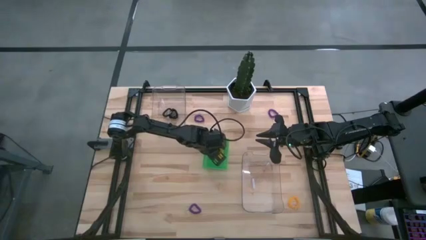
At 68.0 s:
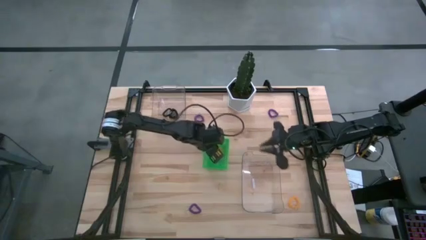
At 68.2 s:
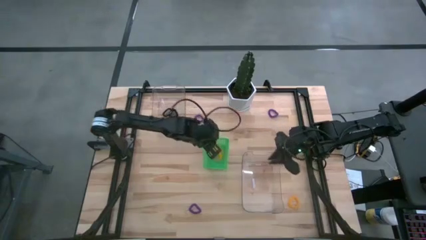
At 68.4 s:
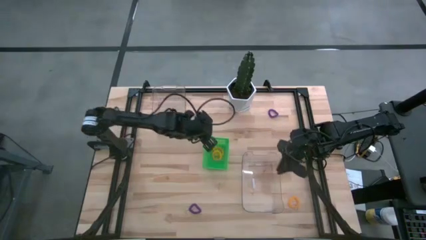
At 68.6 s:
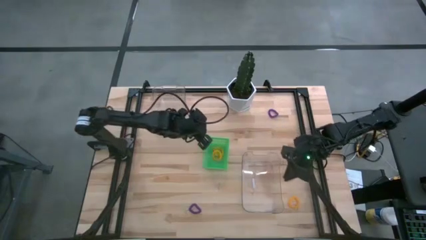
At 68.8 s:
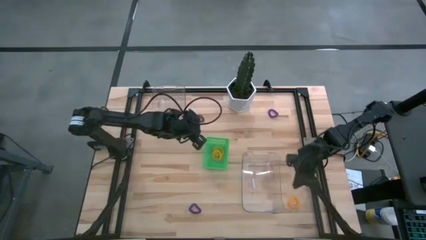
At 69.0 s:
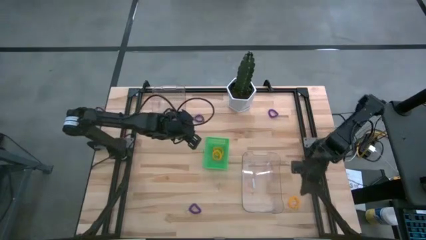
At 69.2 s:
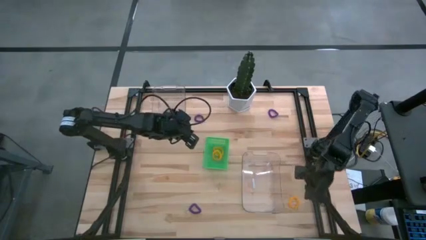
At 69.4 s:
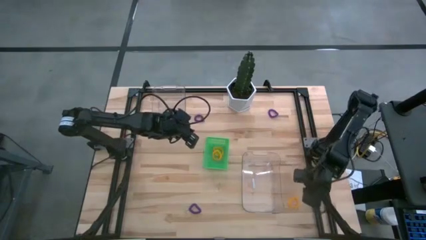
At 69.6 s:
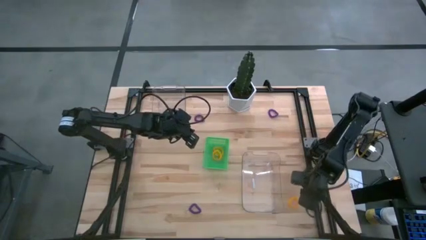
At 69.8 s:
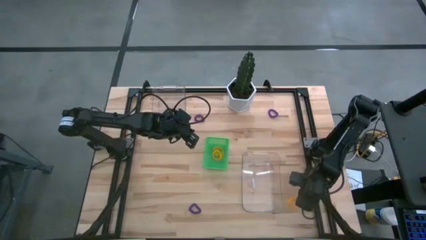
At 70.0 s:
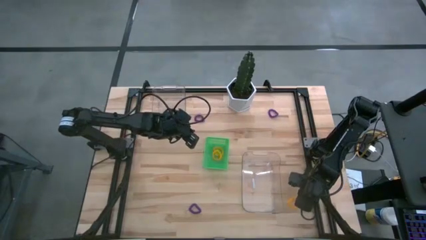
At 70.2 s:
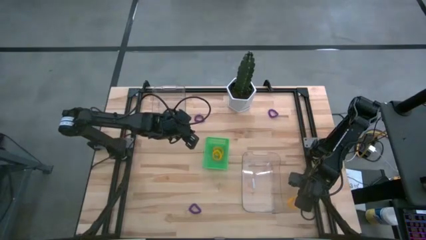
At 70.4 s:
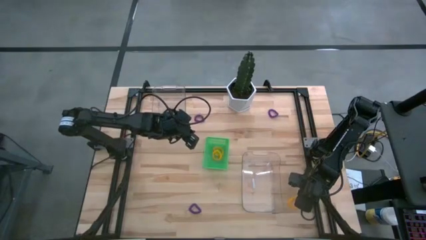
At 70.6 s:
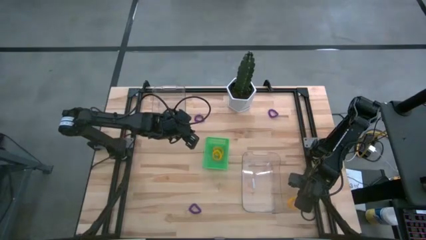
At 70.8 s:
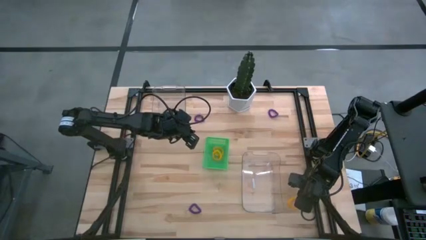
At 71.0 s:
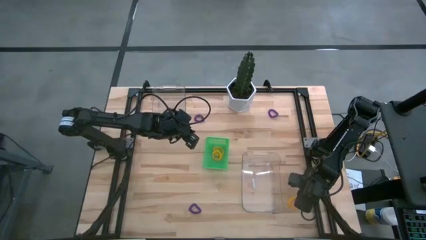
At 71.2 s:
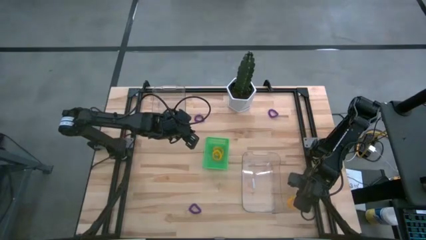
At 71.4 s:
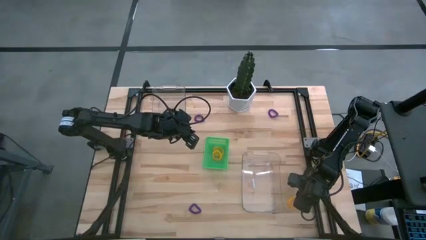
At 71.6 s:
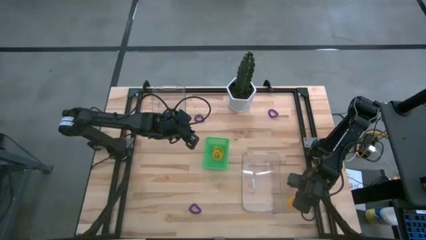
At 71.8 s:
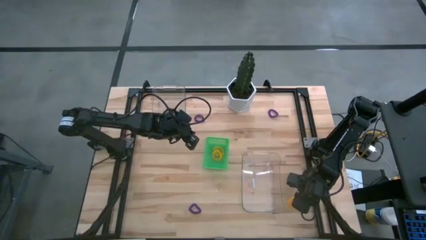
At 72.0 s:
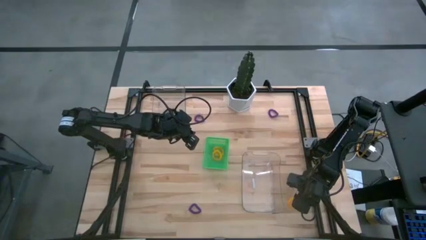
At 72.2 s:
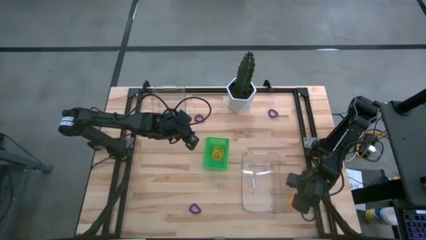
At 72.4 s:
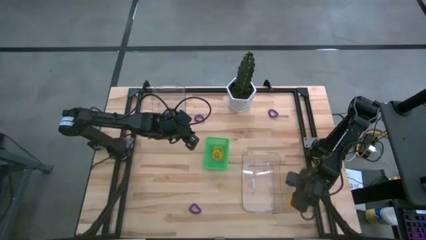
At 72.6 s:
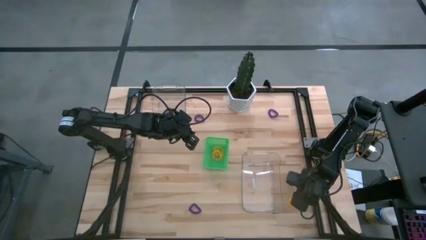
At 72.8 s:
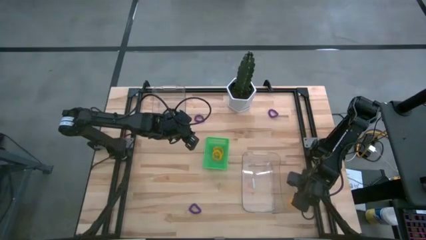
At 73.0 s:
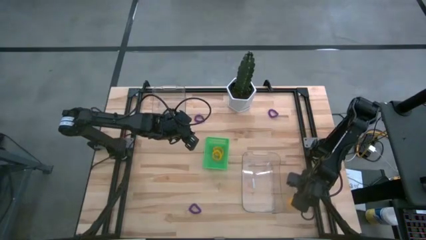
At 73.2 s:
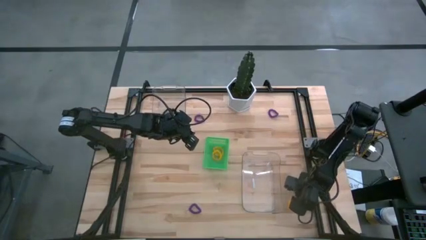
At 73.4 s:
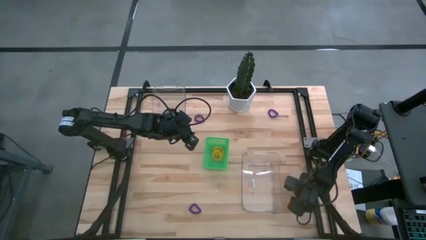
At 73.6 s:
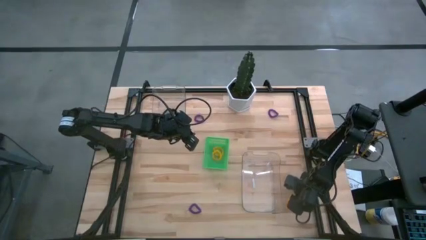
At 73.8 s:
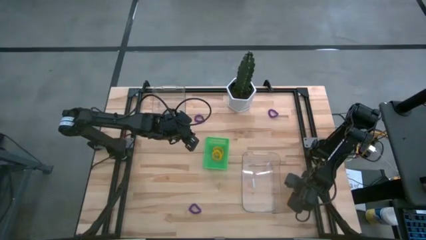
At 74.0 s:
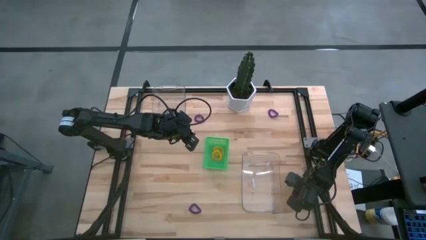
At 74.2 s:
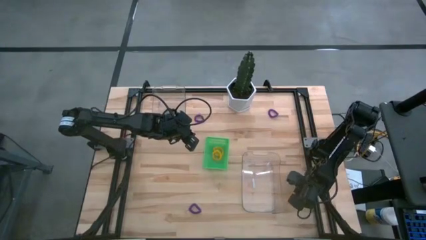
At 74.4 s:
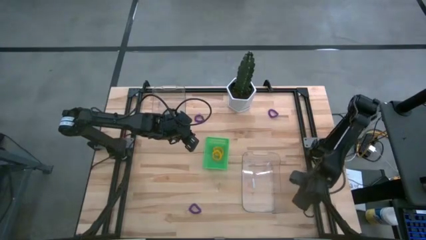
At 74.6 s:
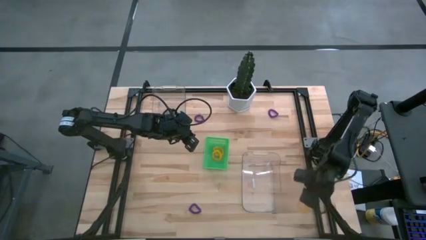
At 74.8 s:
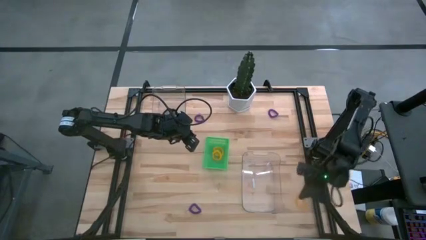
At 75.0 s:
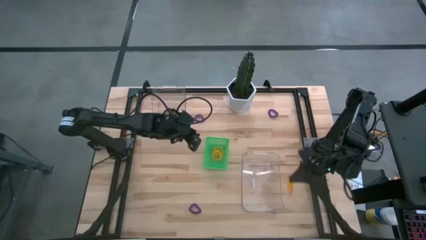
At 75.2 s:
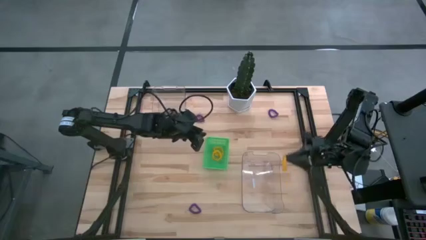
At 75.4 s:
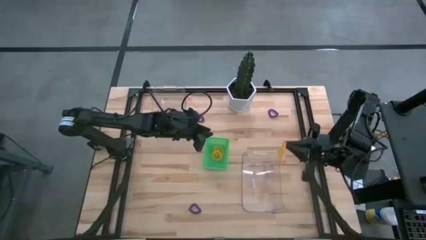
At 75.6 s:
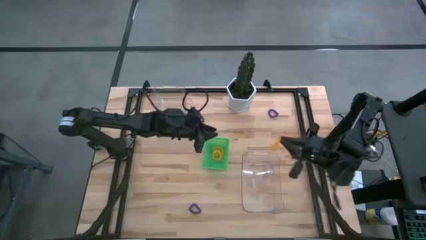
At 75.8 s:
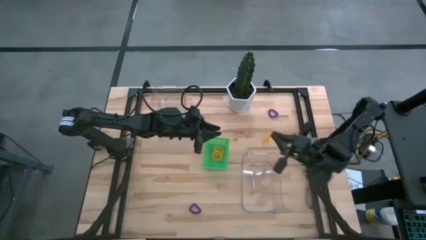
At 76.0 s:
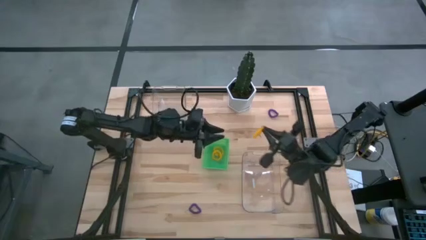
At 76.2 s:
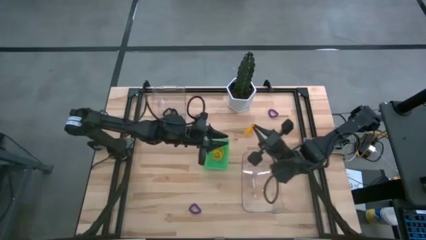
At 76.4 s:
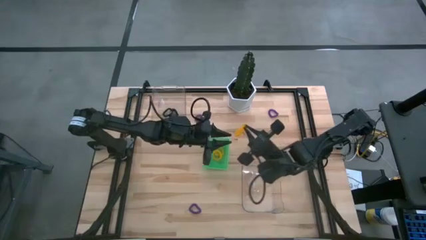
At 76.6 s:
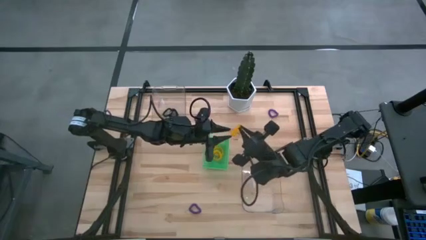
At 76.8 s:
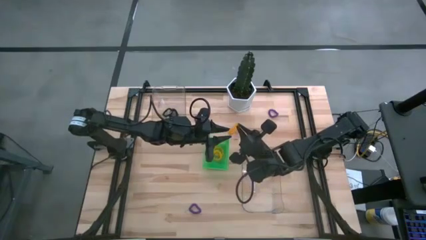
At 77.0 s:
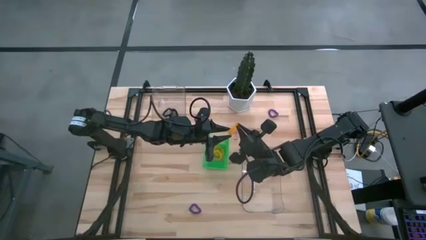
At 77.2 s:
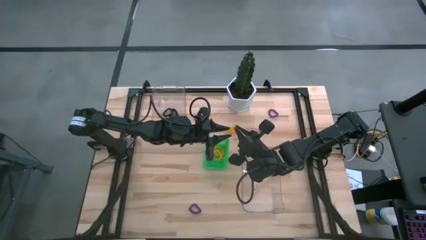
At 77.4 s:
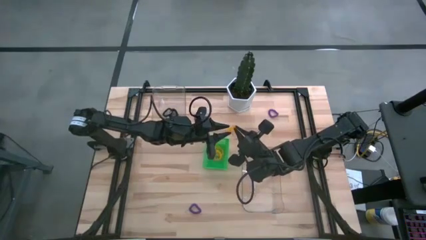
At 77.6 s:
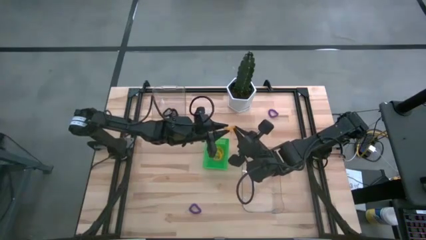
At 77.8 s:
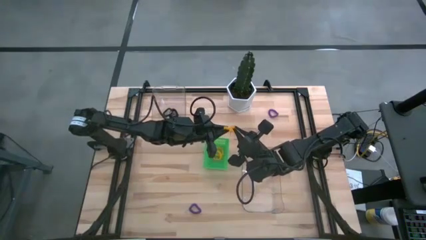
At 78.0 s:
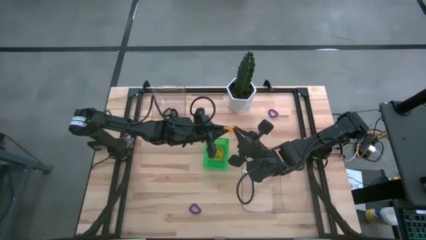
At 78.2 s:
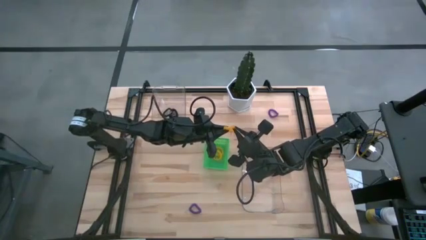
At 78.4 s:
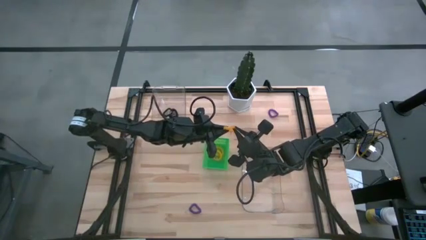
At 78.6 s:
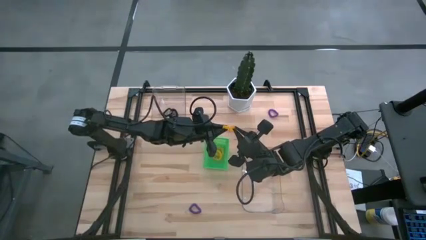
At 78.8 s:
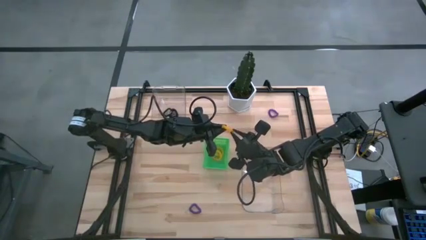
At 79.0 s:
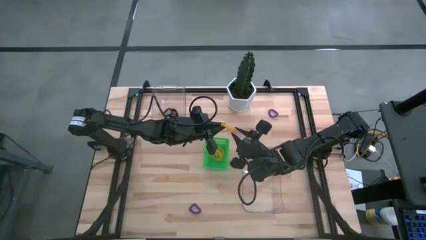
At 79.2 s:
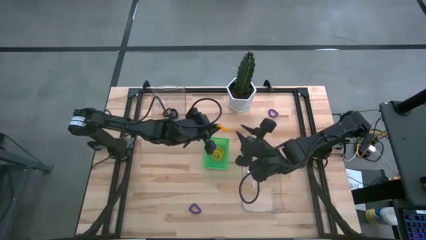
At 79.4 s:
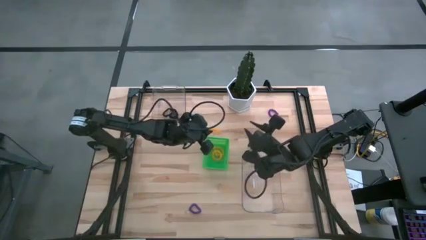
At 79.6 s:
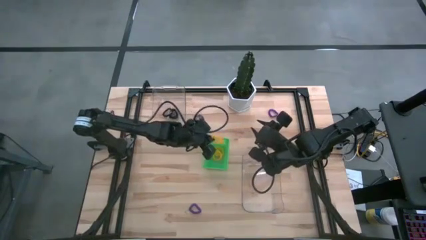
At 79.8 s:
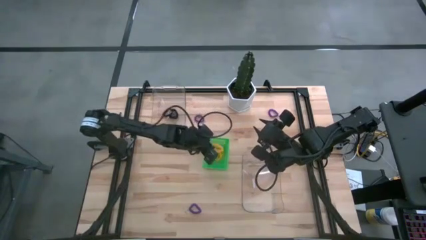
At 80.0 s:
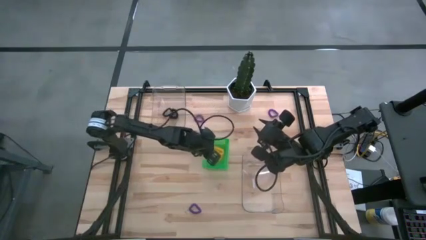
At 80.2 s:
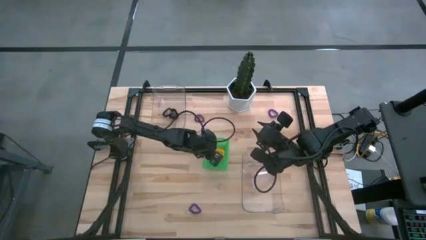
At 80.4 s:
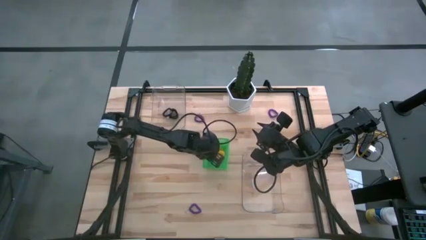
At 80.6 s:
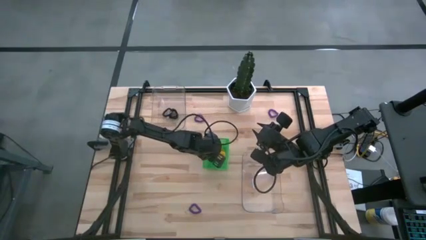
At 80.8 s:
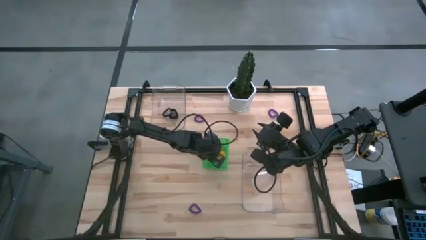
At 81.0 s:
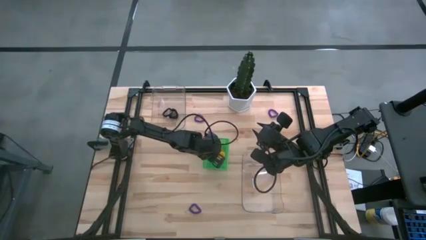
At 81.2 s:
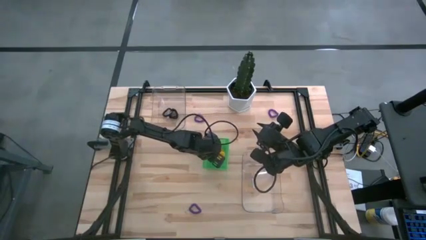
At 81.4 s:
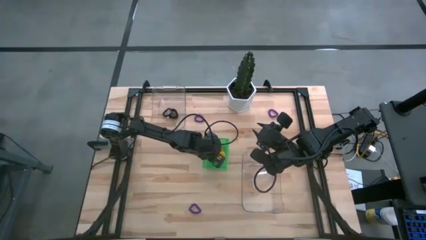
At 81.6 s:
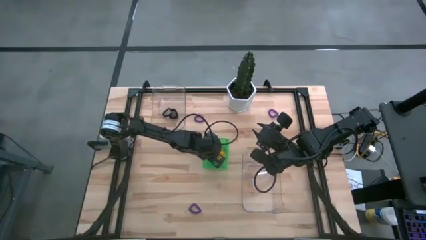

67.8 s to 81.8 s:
Task: Sort spring keychains
Put the orange spring keychain into the green bin
